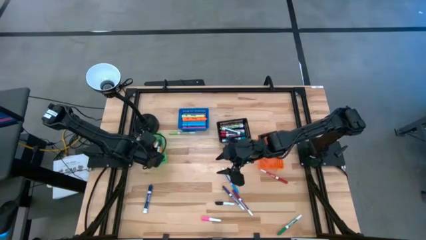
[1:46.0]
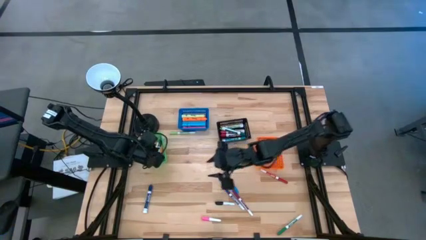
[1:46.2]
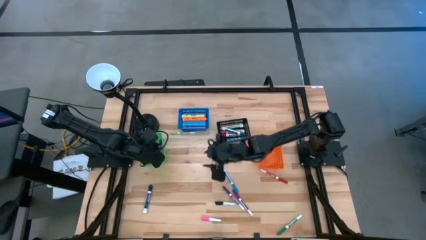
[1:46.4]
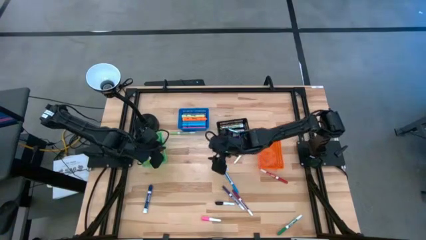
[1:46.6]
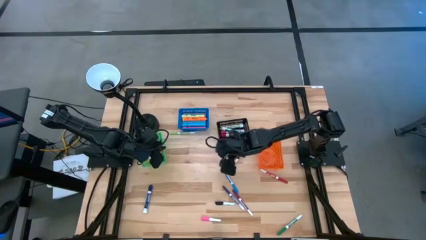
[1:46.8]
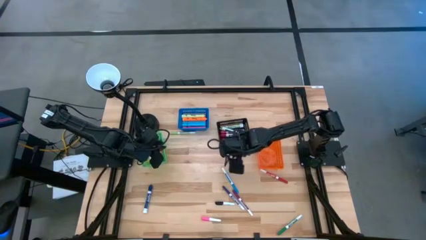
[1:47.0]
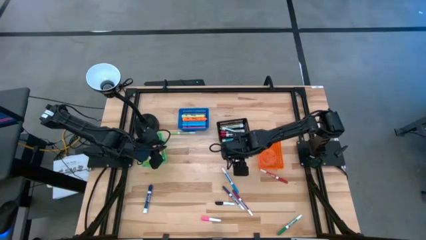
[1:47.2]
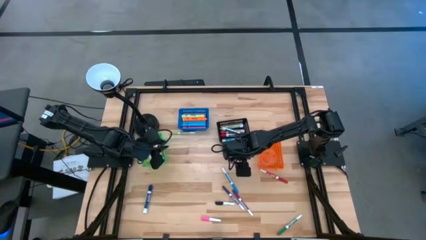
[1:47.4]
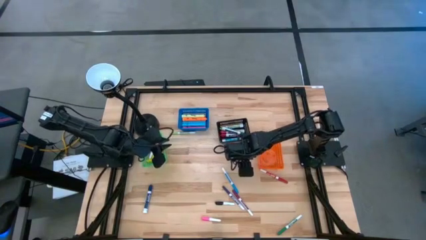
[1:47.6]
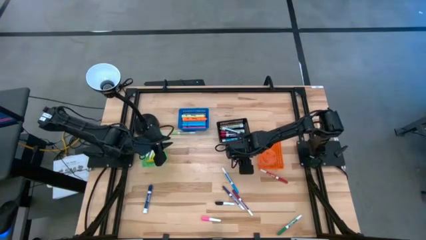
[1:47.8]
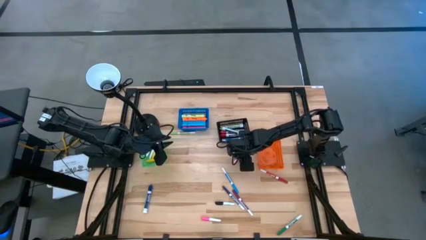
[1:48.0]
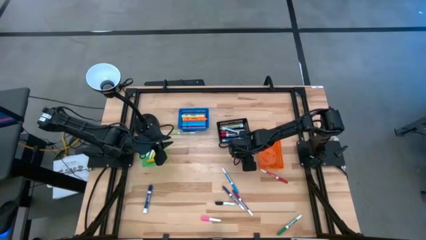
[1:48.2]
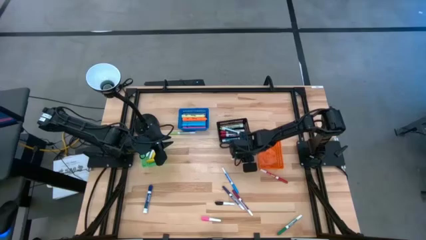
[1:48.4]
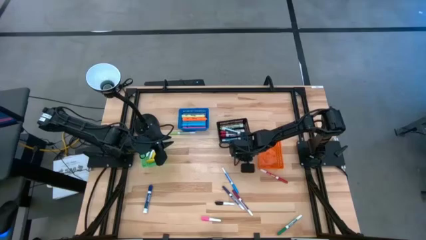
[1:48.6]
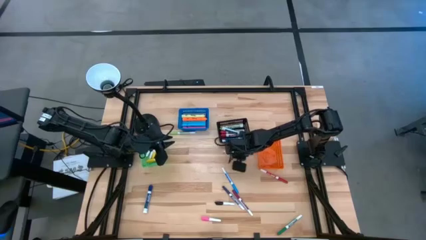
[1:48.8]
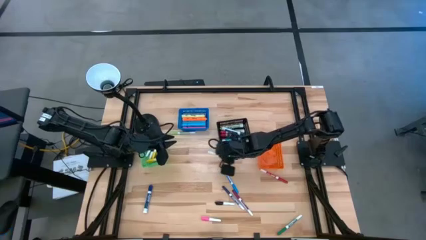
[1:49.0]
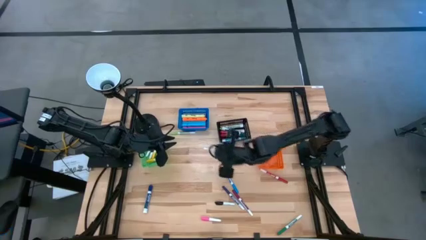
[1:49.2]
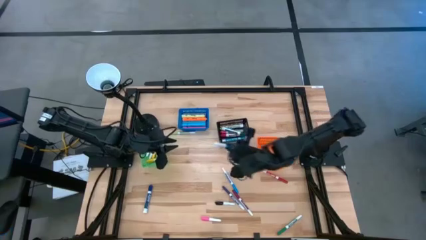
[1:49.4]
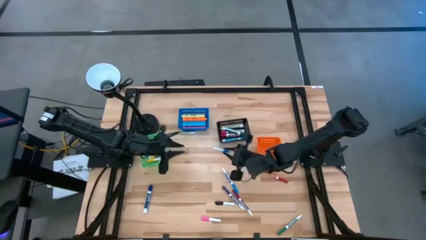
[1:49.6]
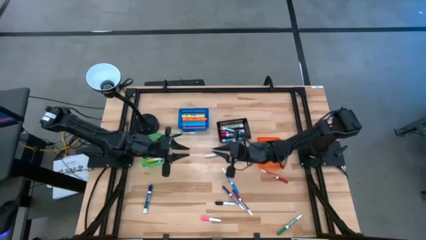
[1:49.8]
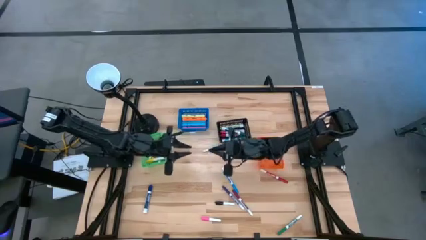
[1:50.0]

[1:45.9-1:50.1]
Task: Pick & Place Markers
Put the light blue highlighter pen into the green basket

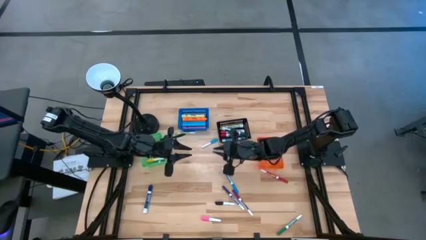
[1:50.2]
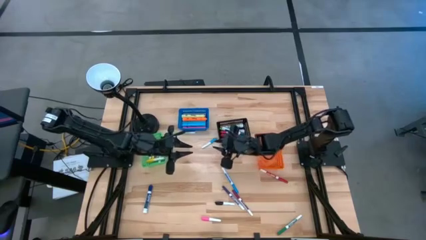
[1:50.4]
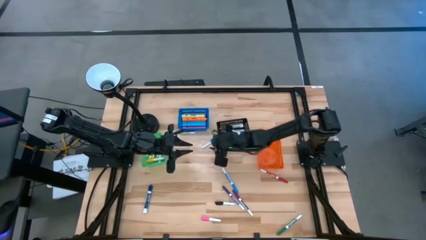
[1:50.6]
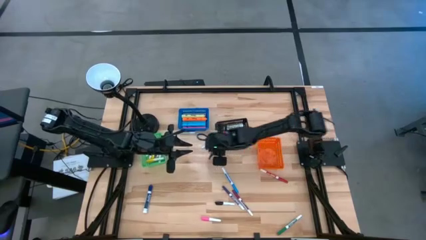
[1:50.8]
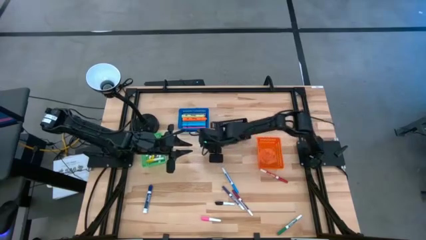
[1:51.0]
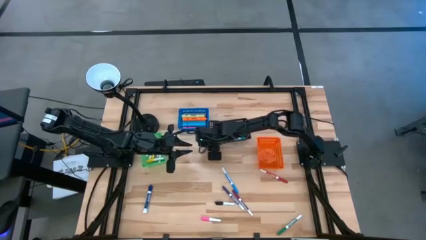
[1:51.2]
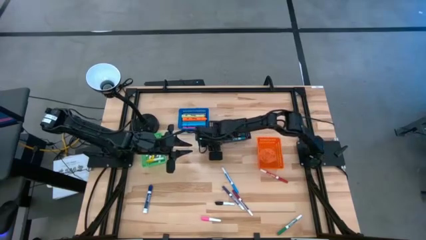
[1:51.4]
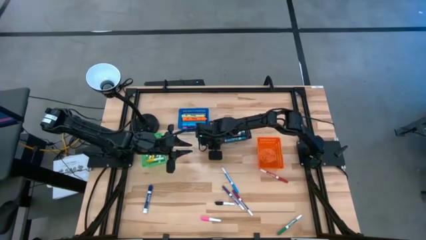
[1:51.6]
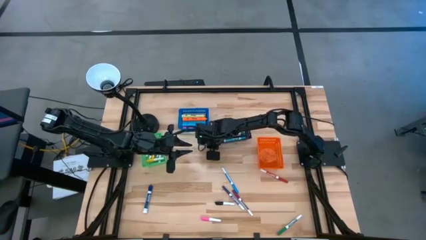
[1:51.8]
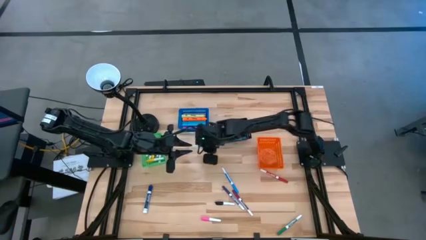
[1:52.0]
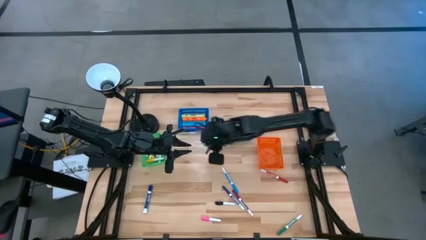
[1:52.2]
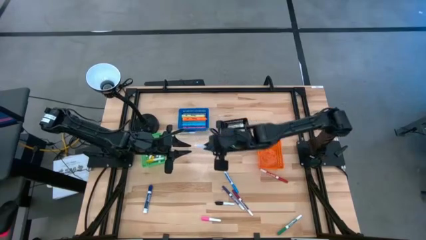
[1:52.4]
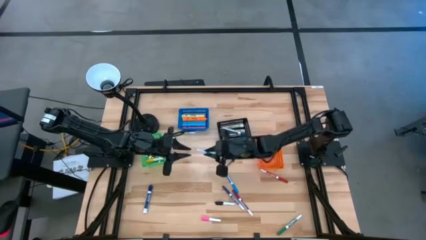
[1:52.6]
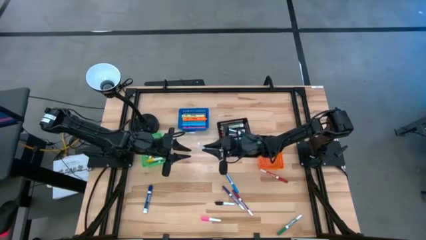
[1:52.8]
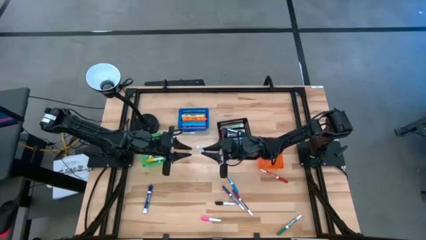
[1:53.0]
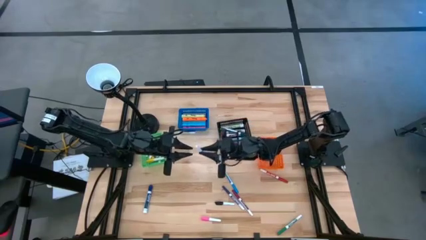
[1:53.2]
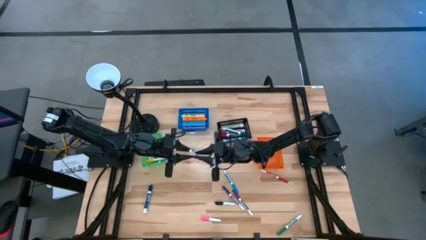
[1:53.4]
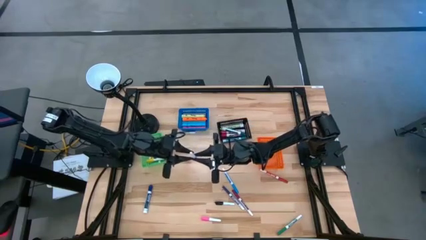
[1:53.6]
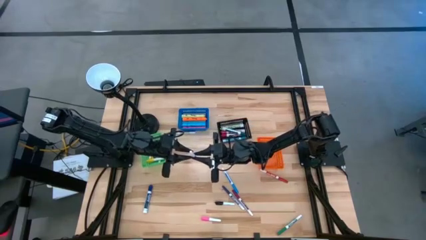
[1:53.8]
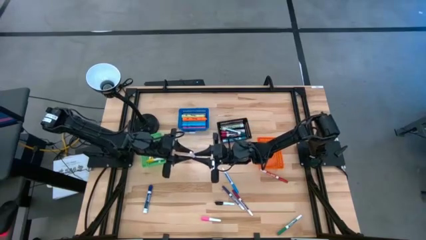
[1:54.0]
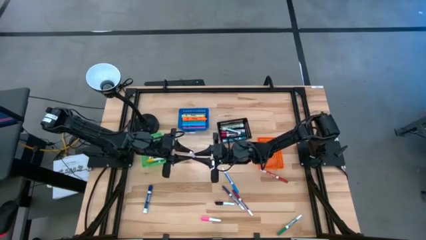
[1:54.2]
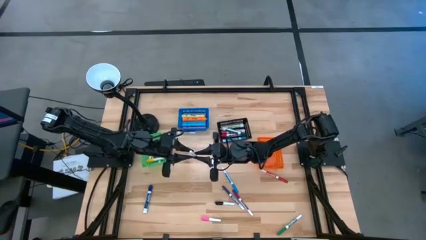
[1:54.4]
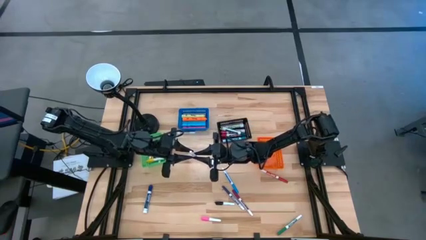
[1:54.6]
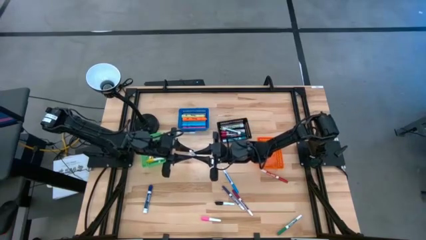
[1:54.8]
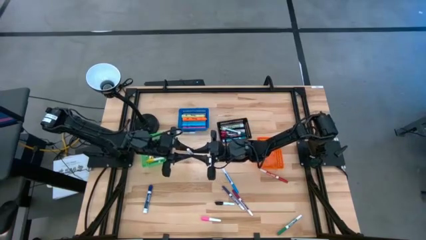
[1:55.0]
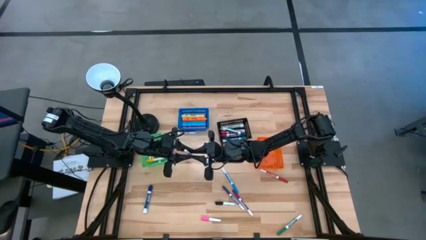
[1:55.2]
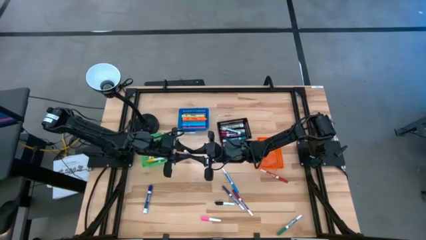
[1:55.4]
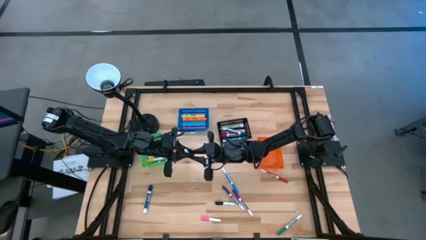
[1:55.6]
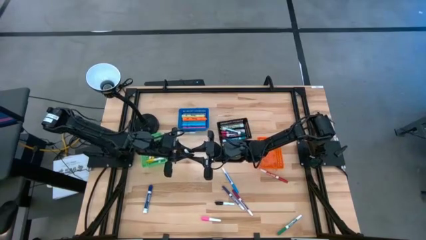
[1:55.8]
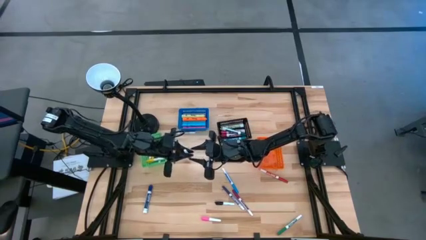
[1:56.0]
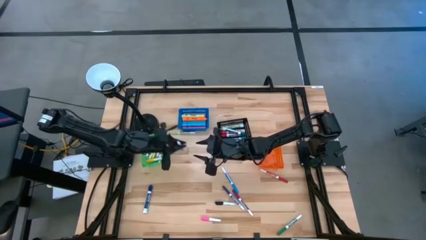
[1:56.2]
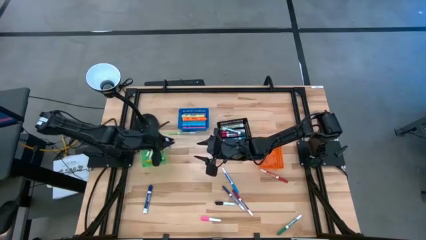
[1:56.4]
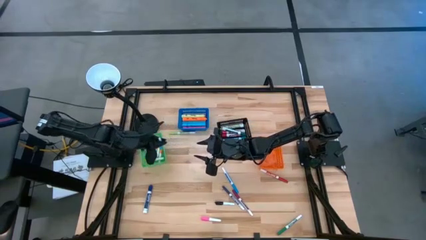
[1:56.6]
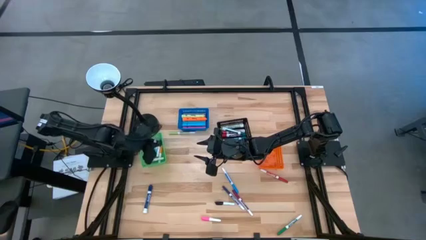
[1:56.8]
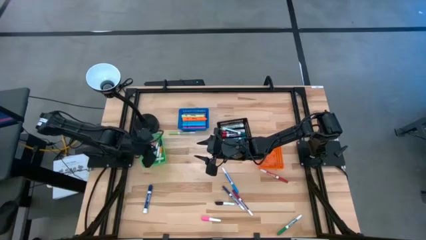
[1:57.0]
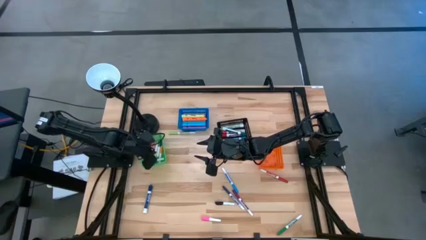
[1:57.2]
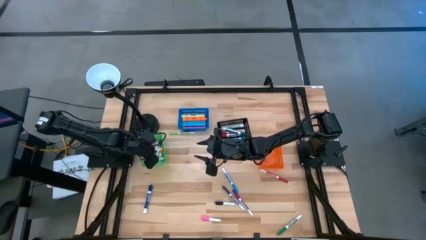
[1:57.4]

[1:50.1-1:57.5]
Put the light blue highlighter pen into the green basket

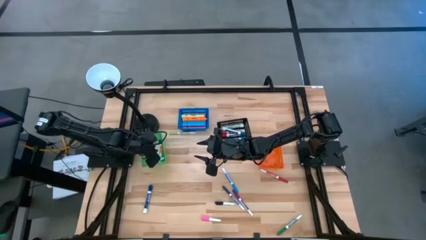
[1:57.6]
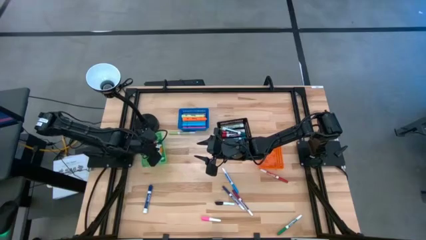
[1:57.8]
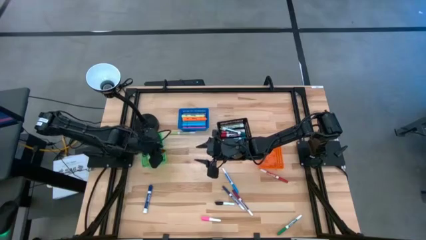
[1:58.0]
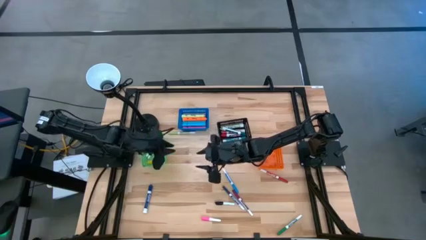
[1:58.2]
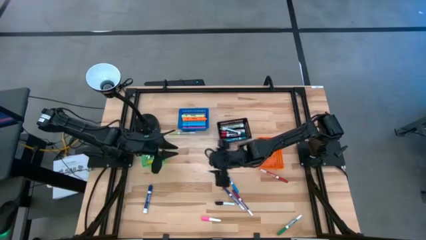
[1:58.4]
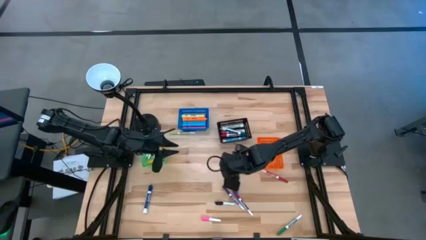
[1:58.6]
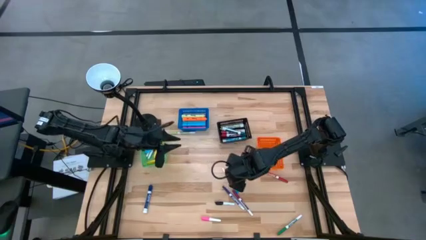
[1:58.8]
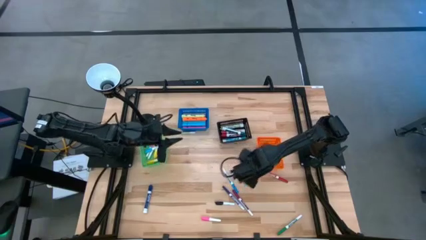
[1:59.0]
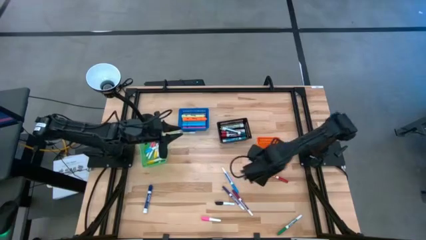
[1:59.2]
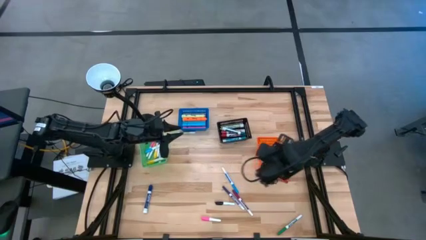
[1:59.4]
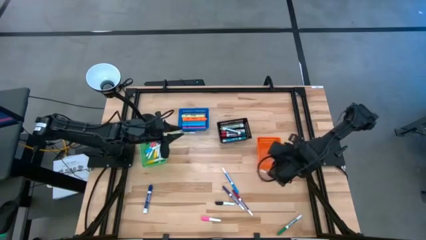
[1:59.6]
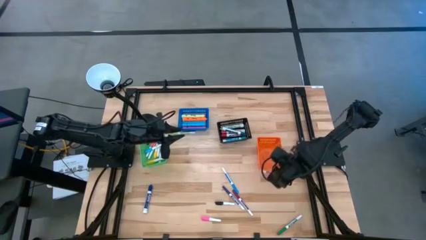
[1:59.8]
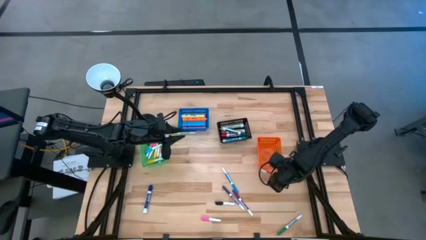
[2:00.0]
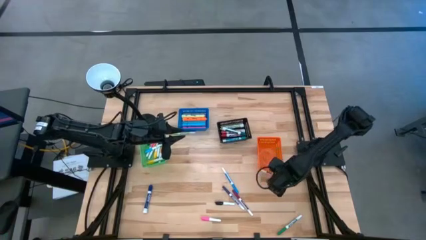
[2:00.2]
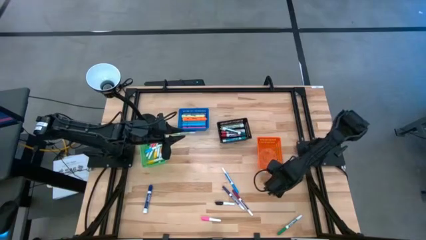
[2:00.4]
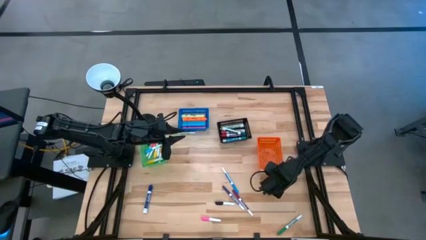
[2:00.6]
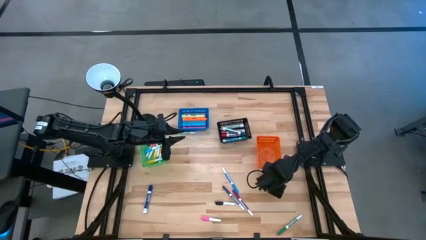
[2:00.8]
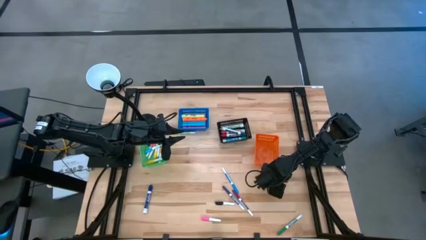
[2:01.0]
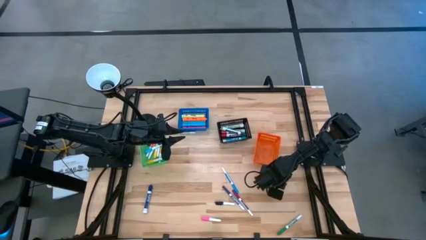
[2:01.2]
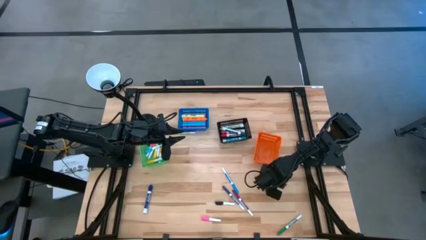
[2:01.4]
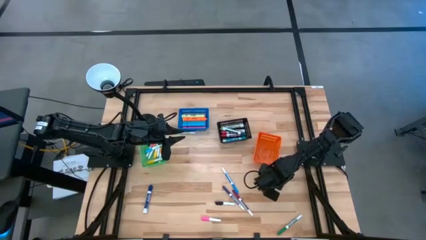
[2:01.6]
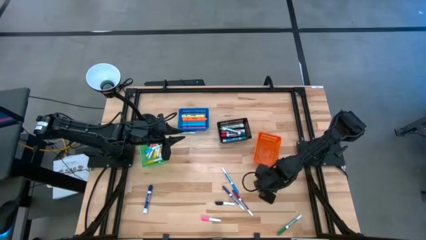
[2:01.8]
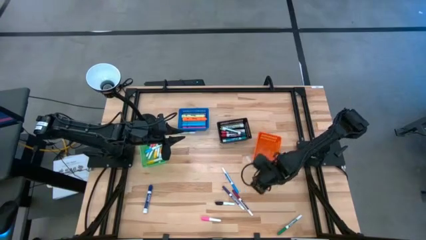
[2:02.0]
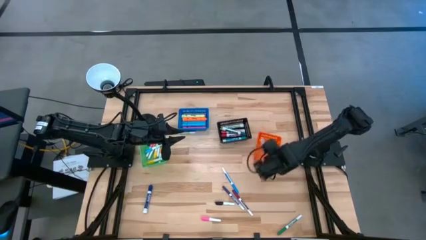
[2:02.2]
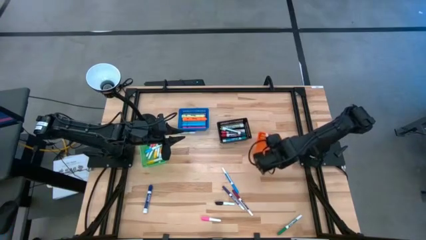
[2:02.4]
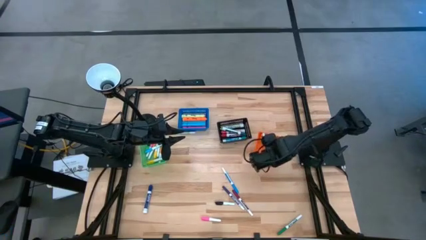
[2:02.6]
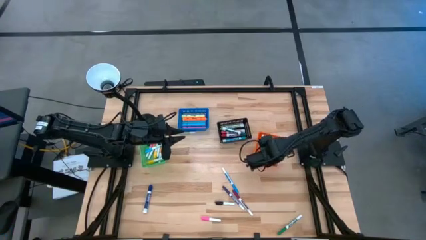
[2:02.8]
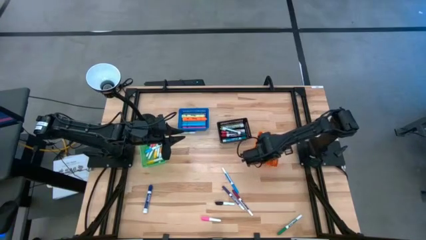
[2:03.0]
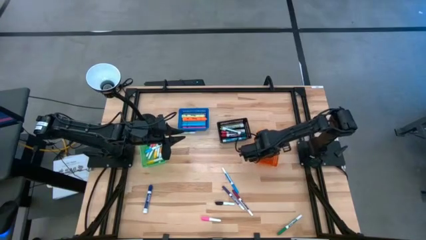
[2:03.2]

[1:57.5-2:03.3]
Put the red marker pen into the orange basket
